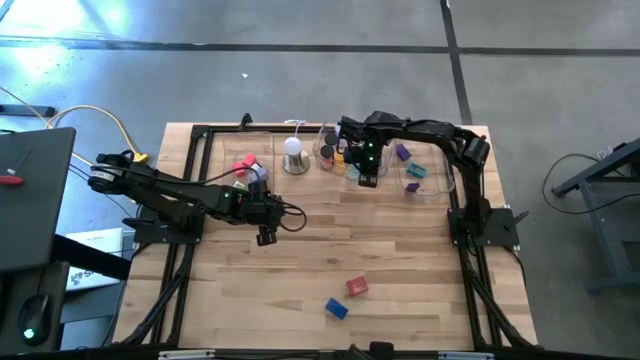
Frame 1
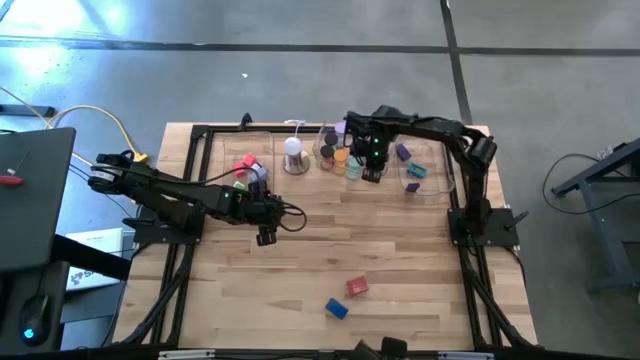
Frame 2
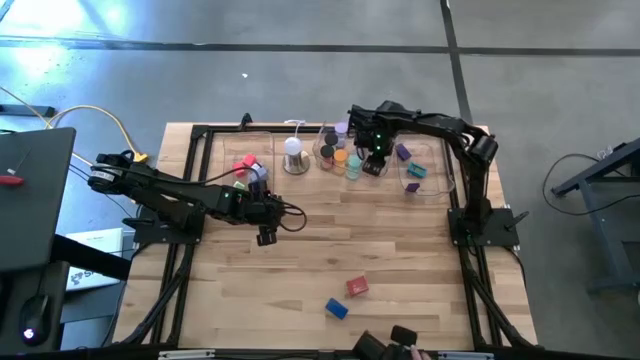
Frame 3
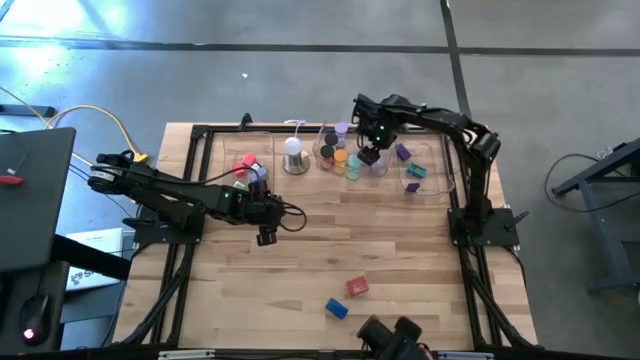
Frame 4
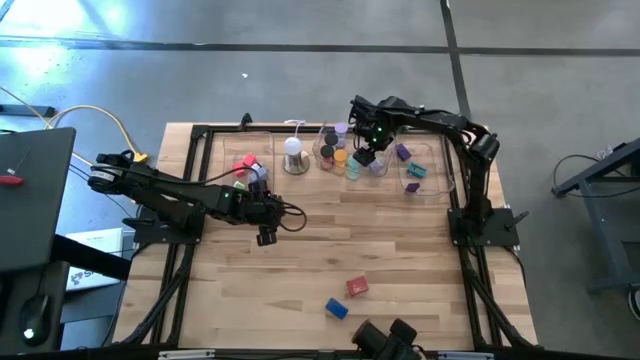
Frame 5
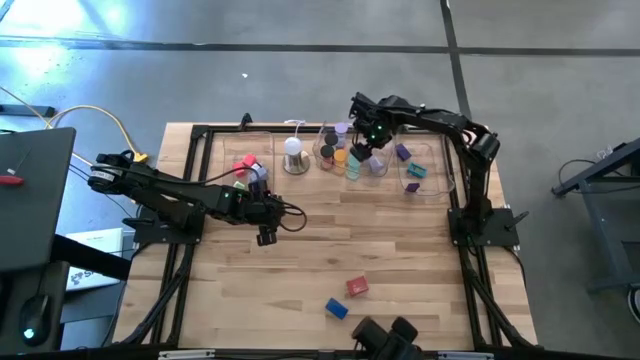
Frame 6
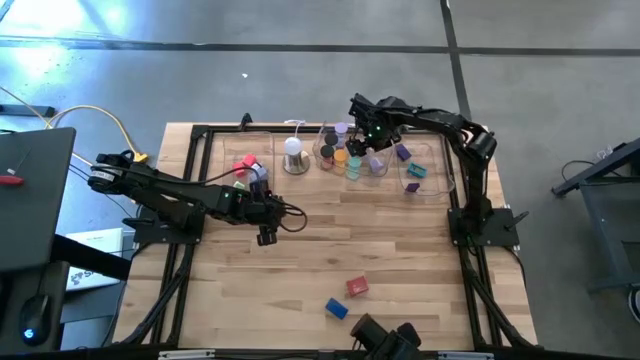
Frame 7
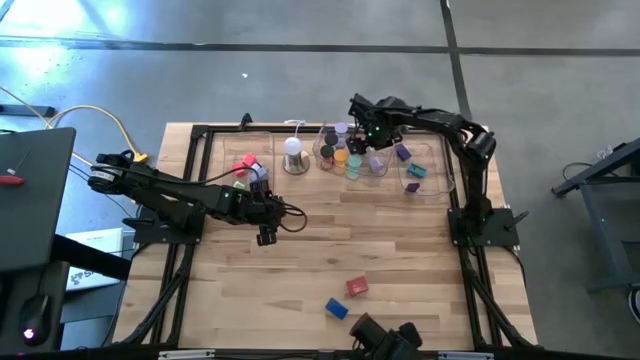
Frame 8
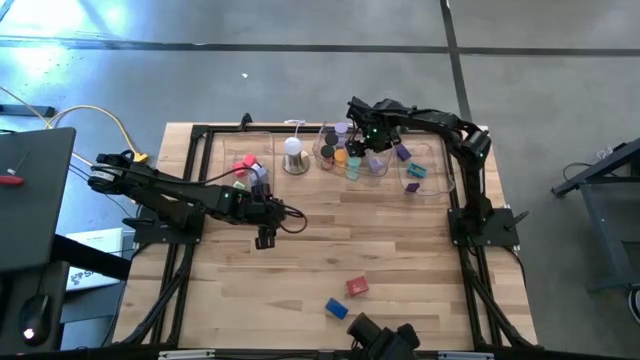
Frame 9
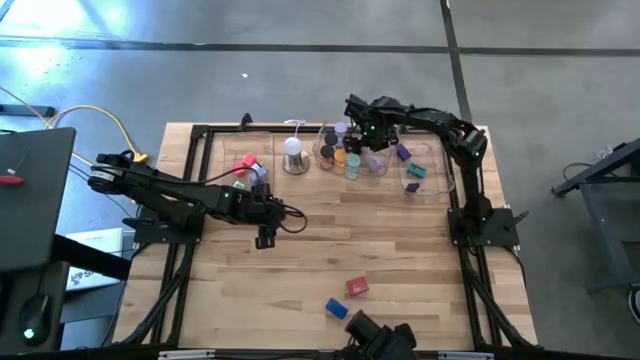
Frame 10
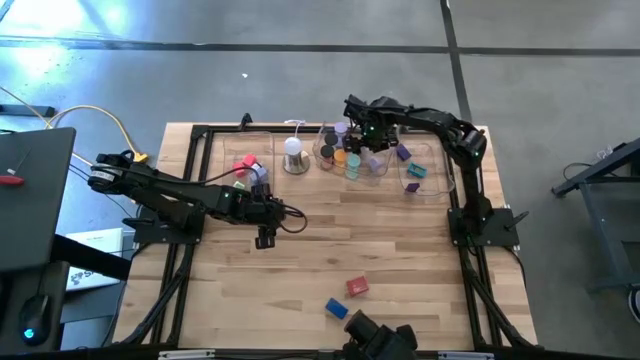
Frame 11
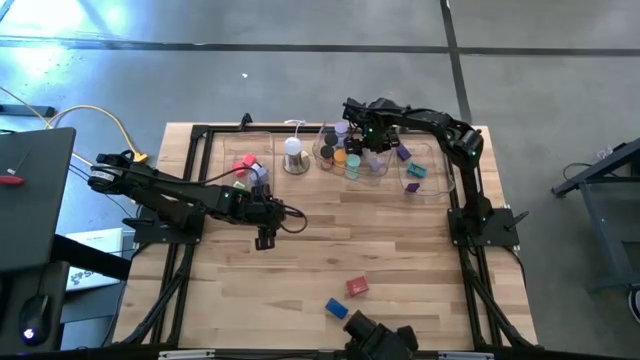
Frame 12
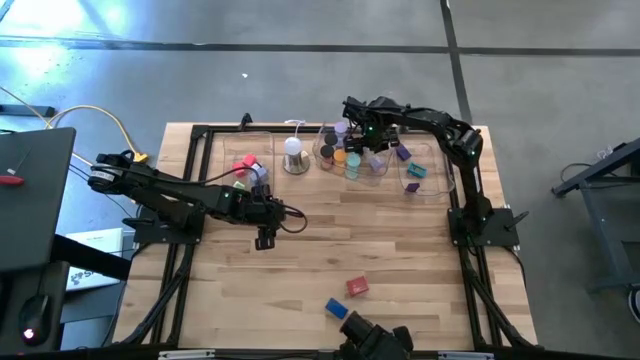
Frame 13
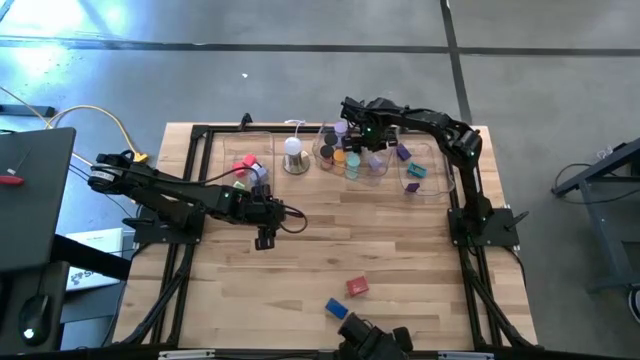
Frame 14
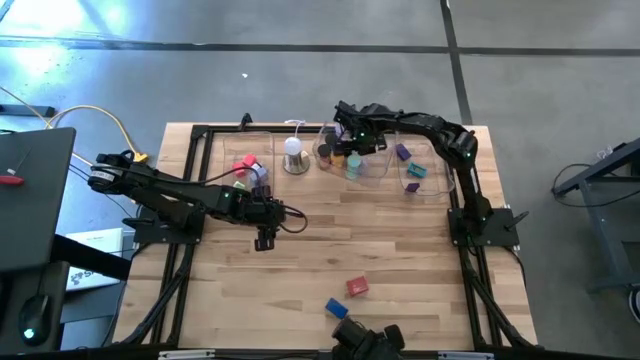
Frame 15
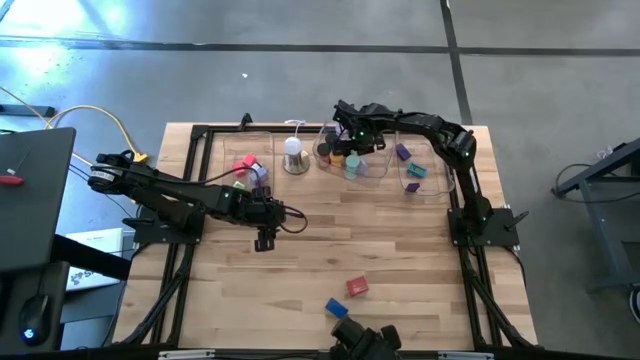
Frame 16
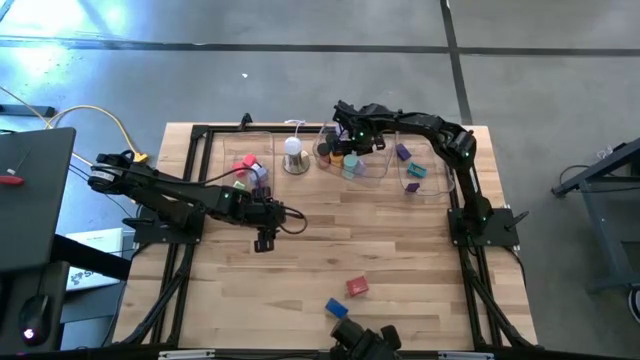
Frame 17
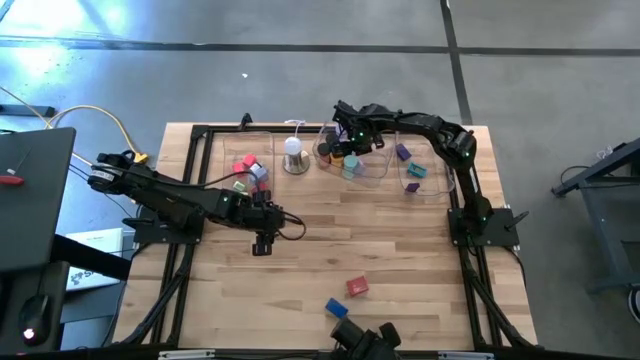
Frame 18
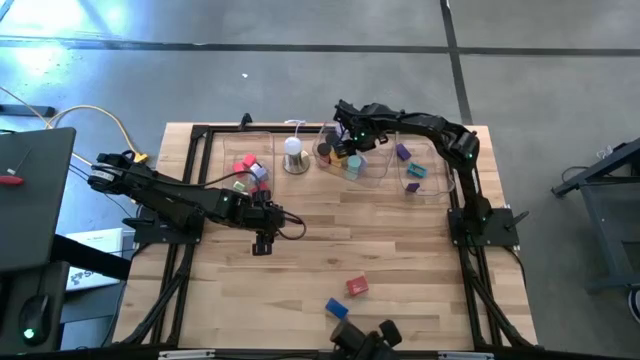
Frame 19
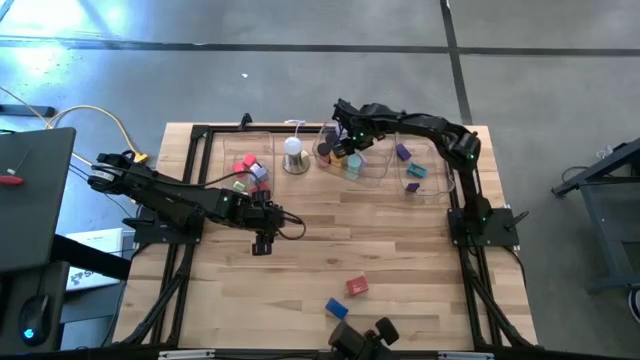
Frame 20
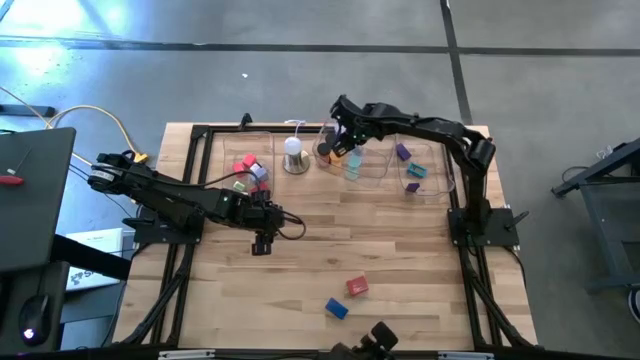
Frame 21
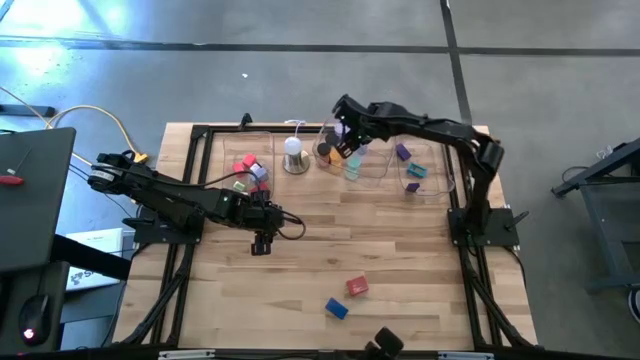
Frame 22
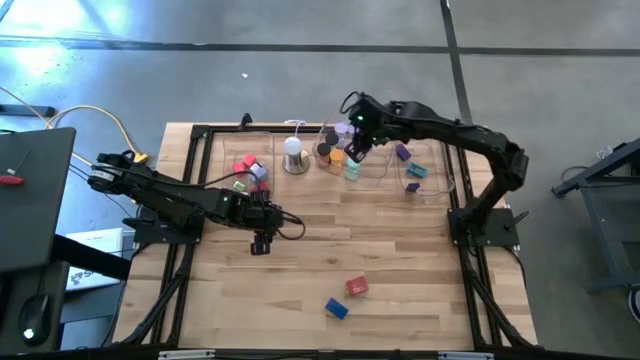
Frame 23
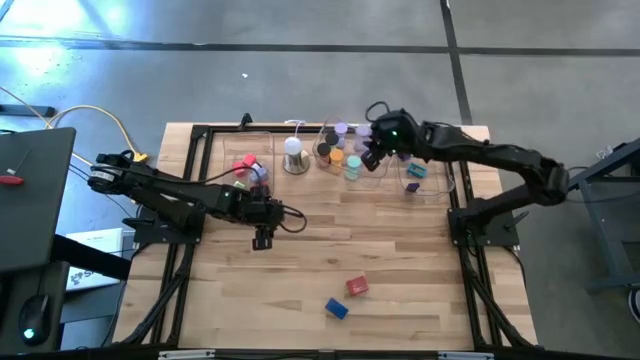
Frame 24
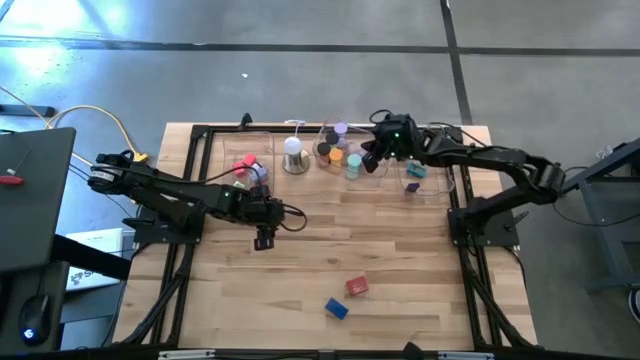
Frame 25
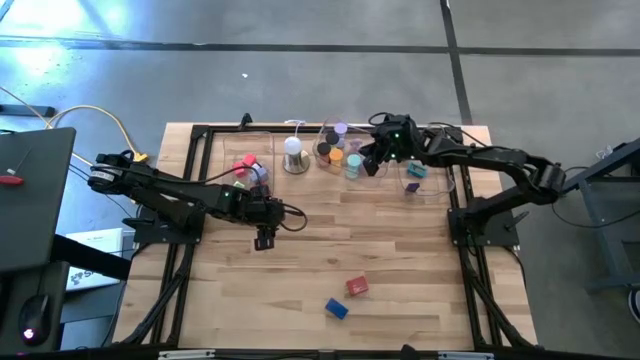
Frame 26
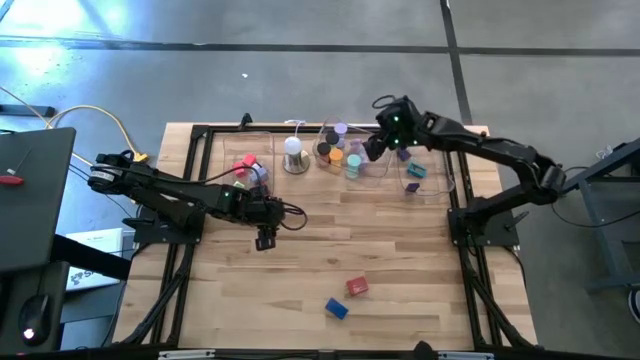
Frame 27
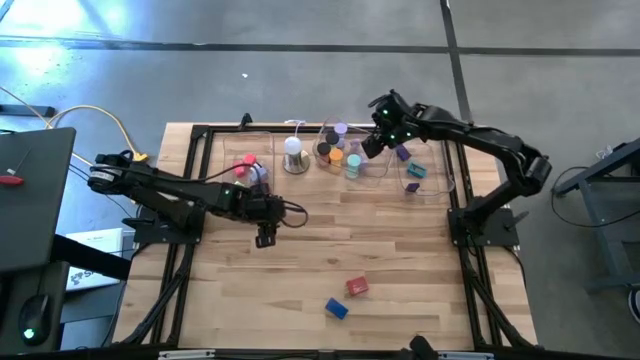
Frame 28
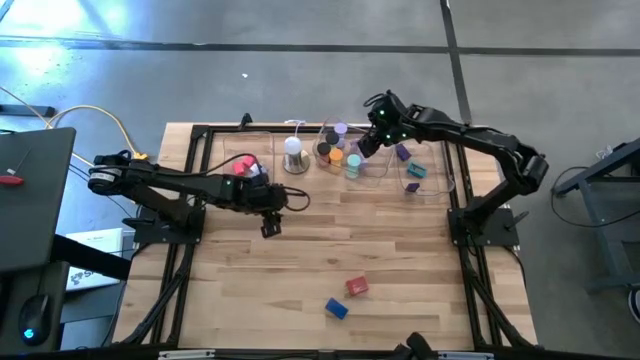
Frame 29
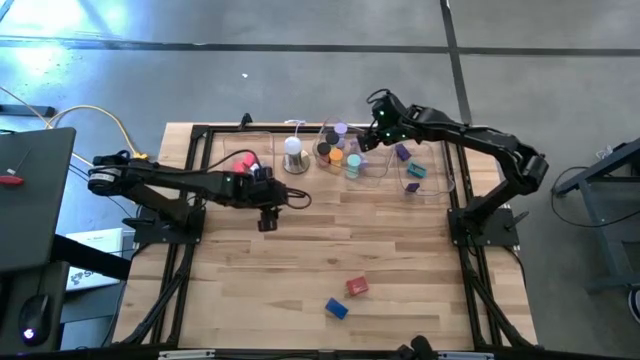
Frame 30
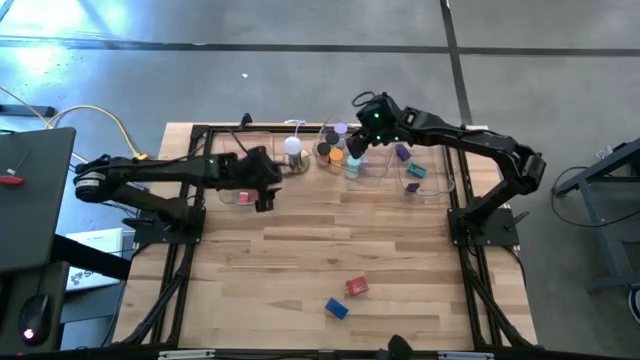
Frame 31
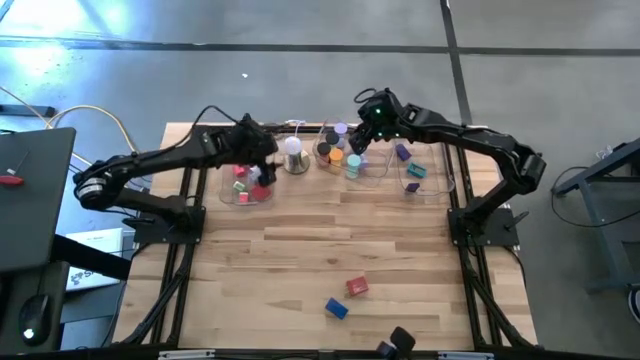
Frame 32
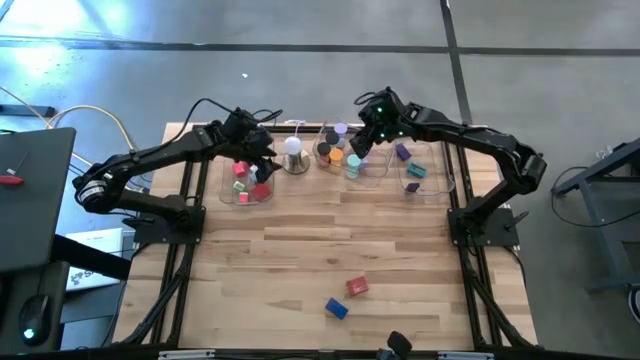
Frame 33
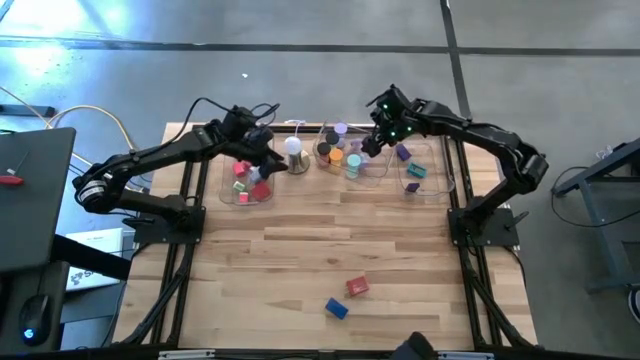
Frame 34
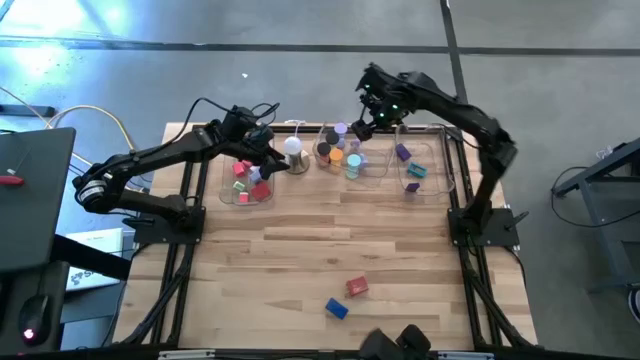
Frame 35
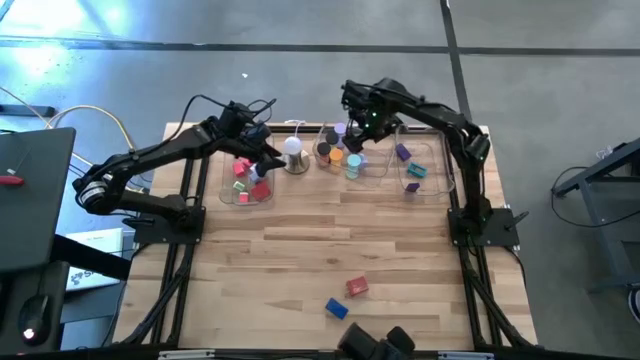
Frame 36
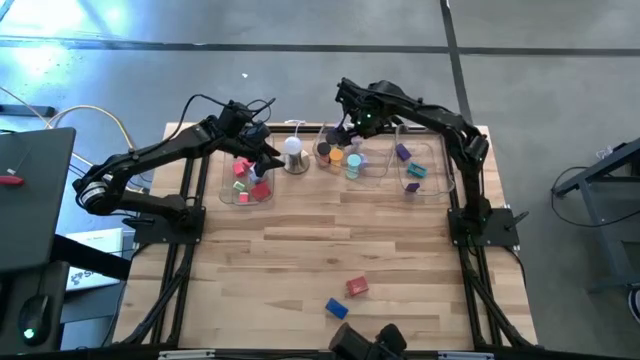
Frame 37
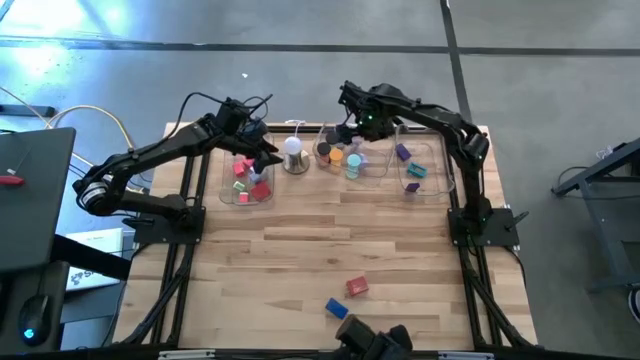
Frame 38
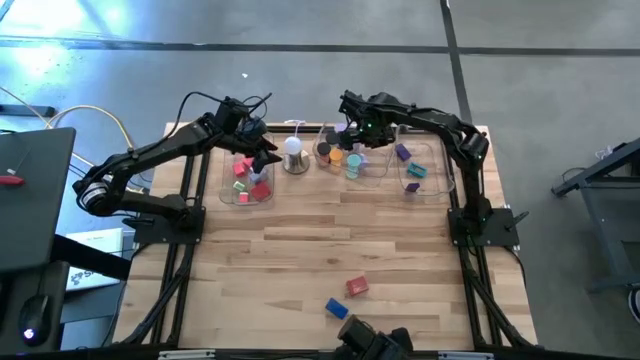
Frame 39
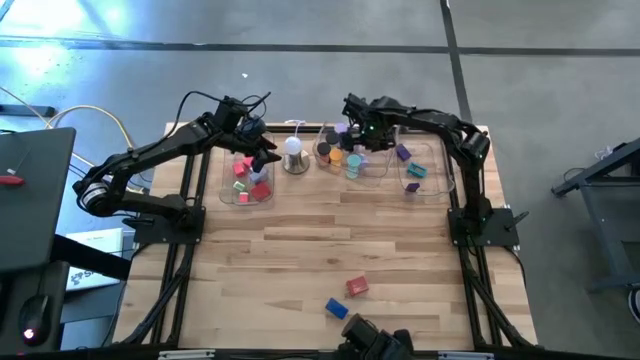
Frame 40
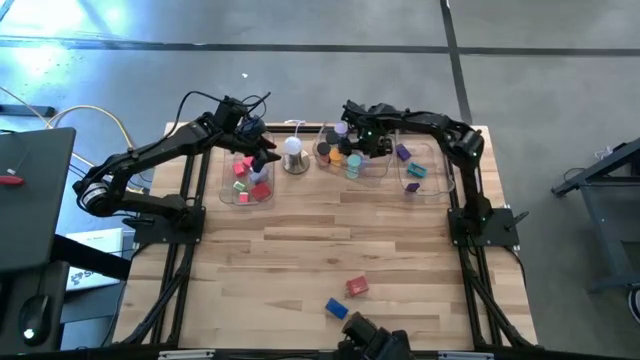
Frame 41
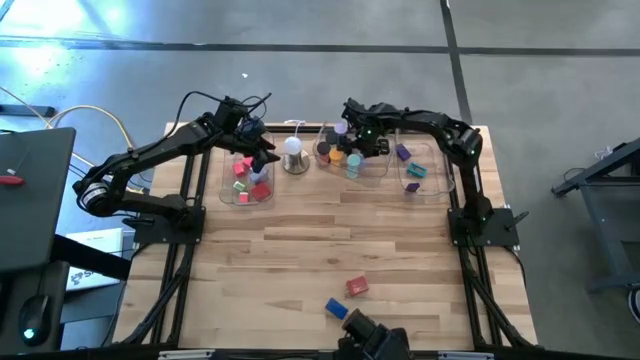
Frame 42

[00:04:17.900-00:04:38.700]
Task: Pick & Place Office items
Put the purple hourglass into the middle transparent bin
